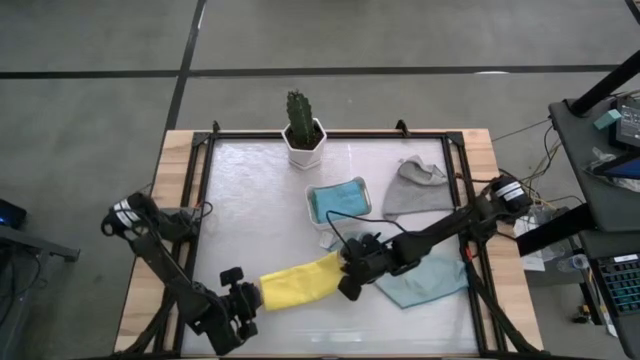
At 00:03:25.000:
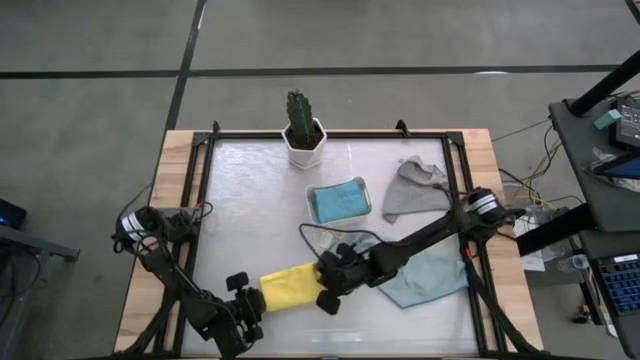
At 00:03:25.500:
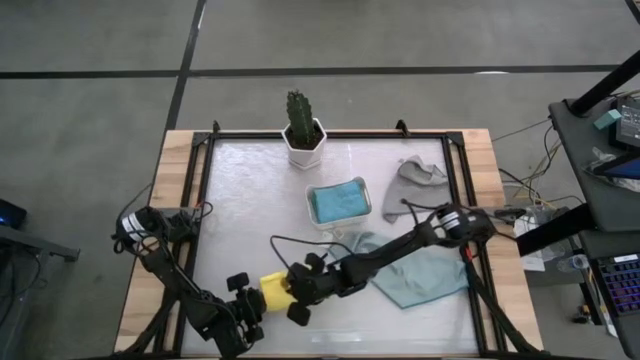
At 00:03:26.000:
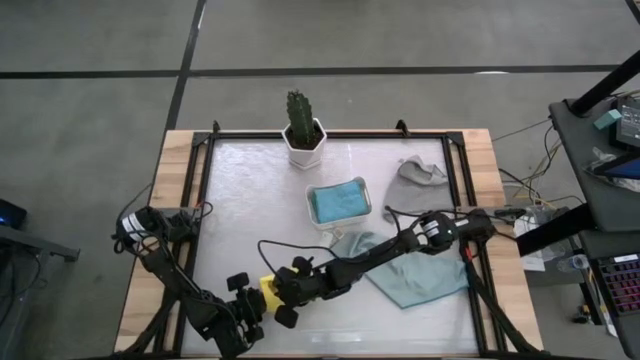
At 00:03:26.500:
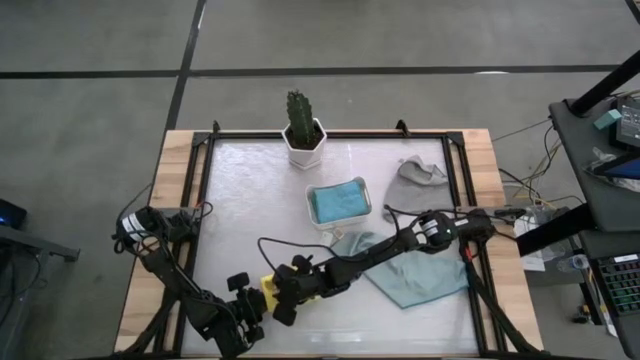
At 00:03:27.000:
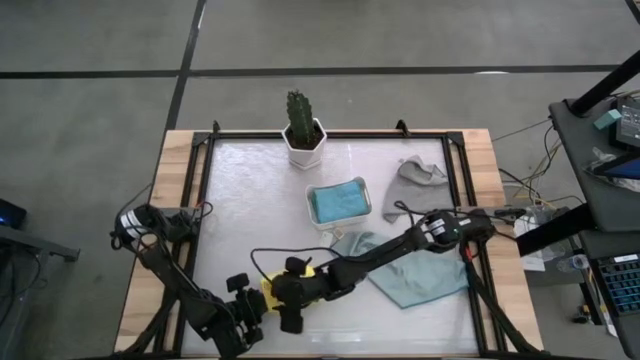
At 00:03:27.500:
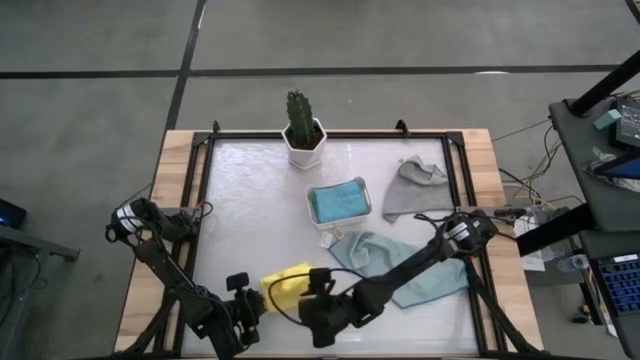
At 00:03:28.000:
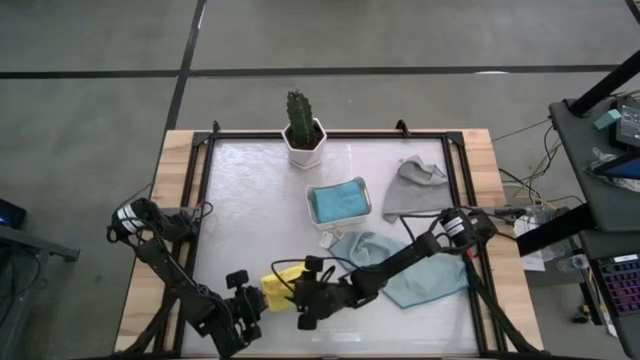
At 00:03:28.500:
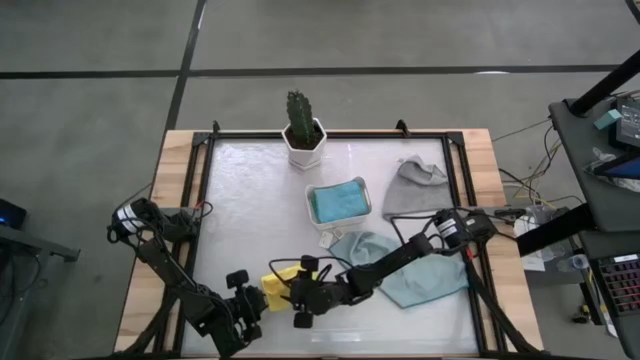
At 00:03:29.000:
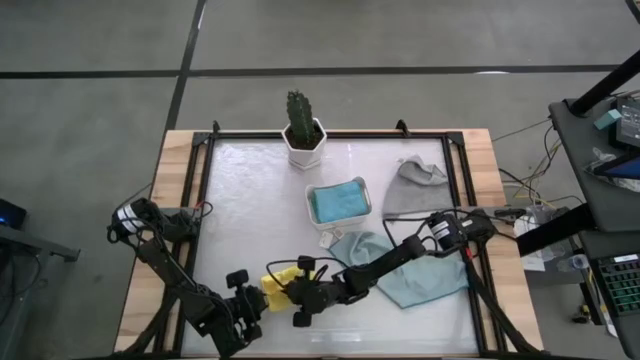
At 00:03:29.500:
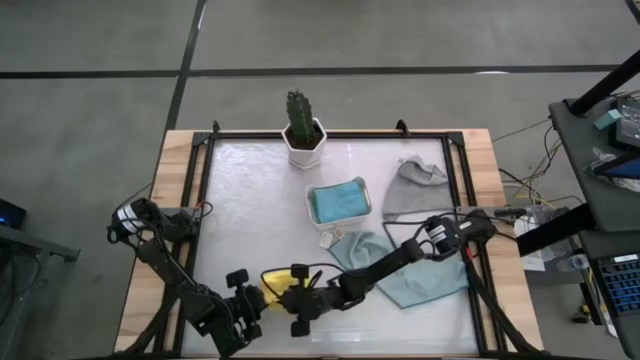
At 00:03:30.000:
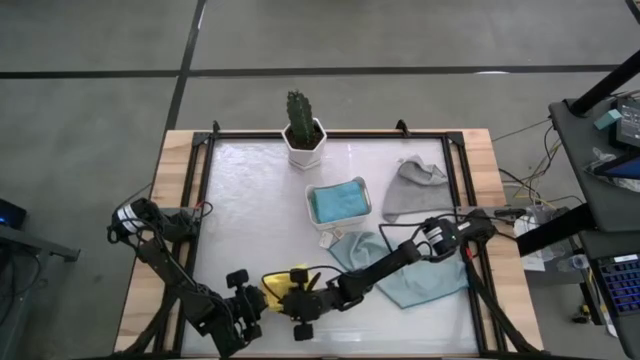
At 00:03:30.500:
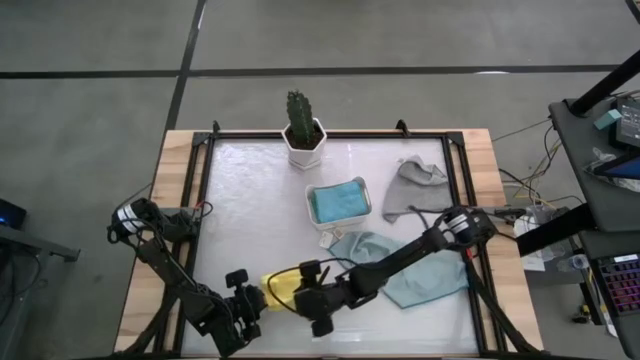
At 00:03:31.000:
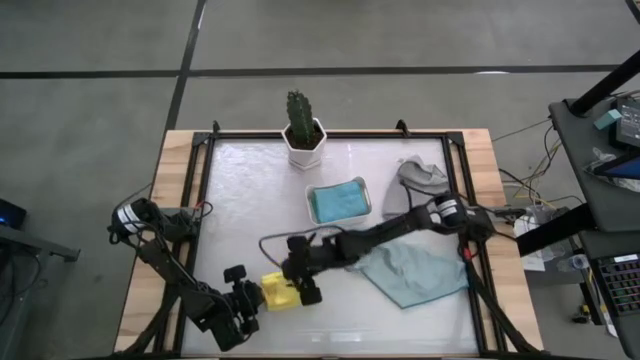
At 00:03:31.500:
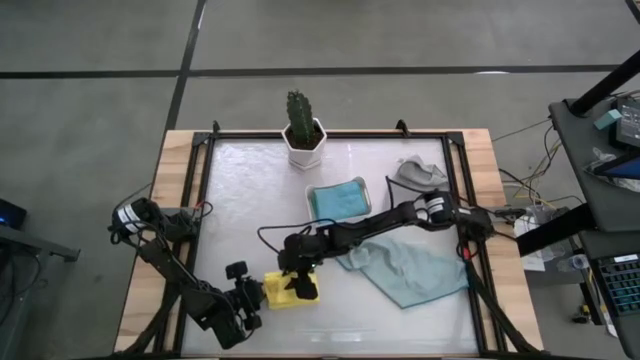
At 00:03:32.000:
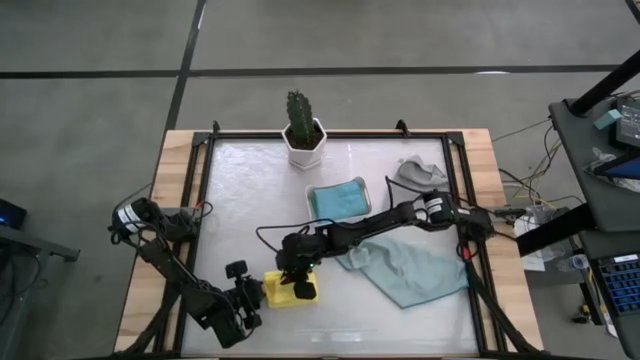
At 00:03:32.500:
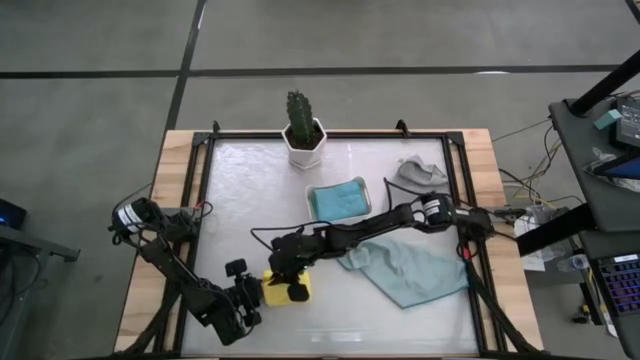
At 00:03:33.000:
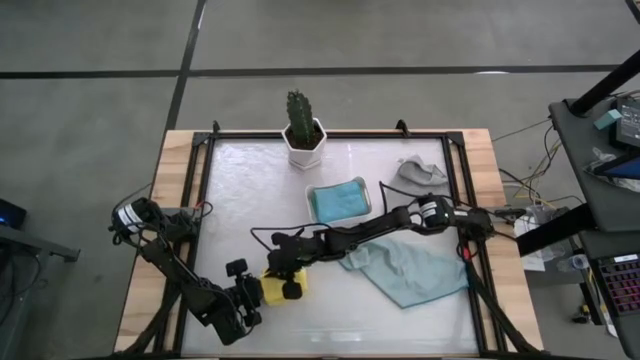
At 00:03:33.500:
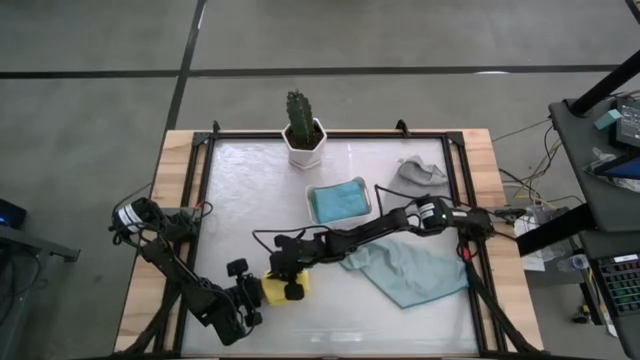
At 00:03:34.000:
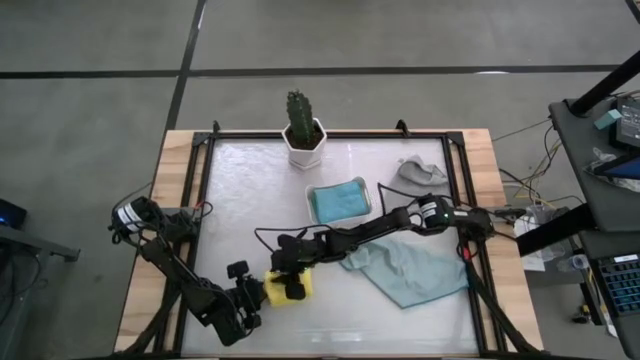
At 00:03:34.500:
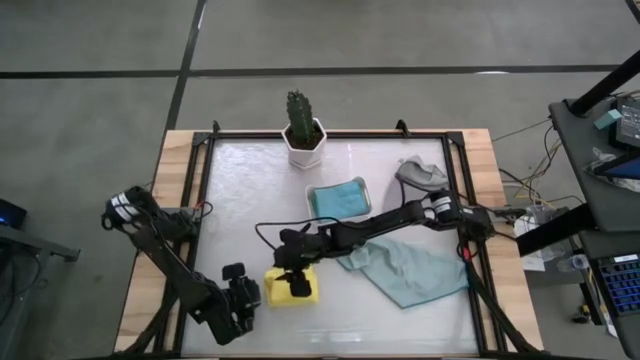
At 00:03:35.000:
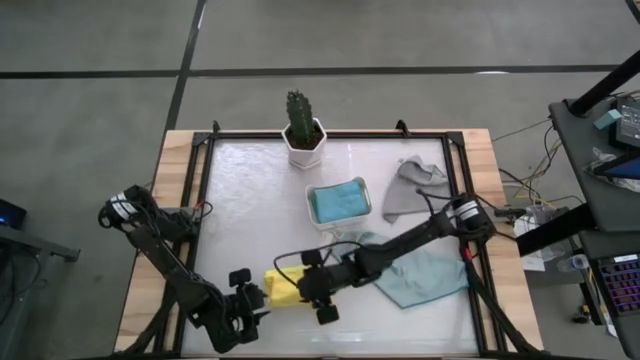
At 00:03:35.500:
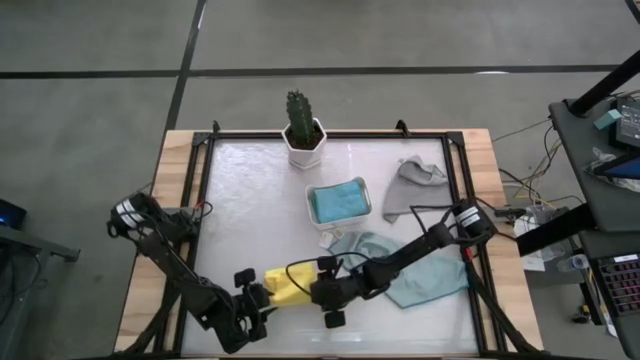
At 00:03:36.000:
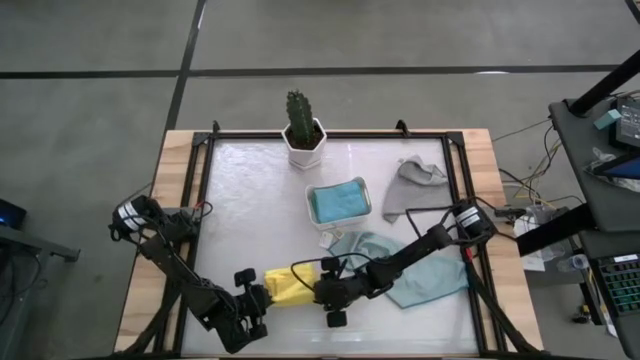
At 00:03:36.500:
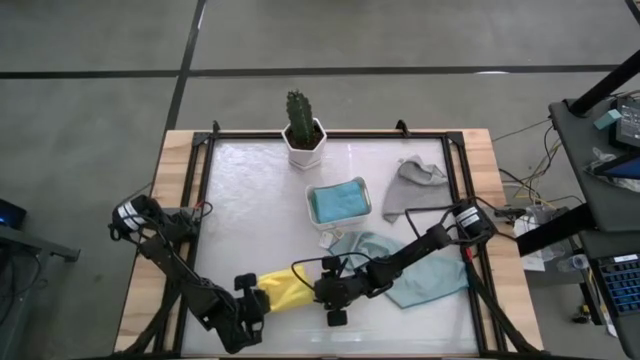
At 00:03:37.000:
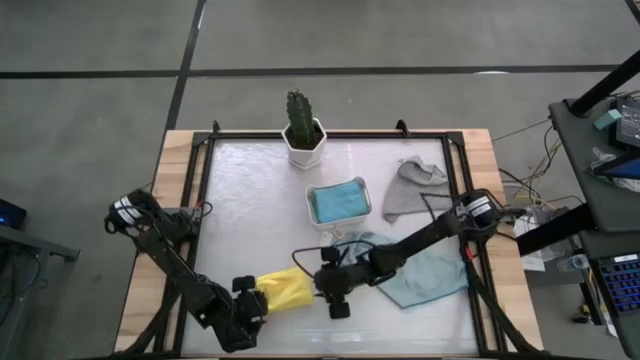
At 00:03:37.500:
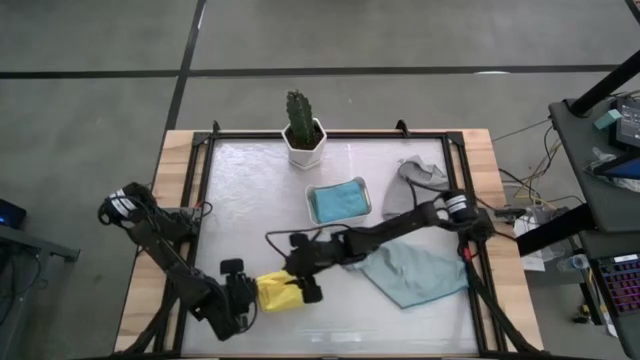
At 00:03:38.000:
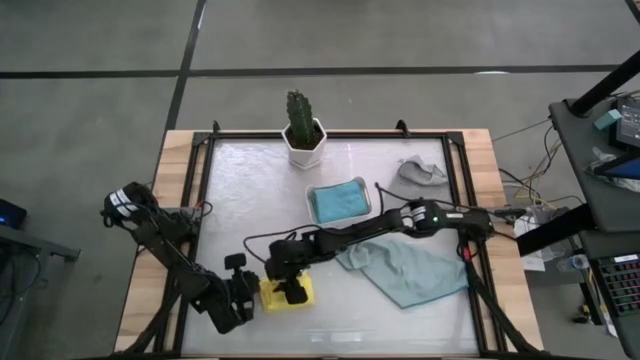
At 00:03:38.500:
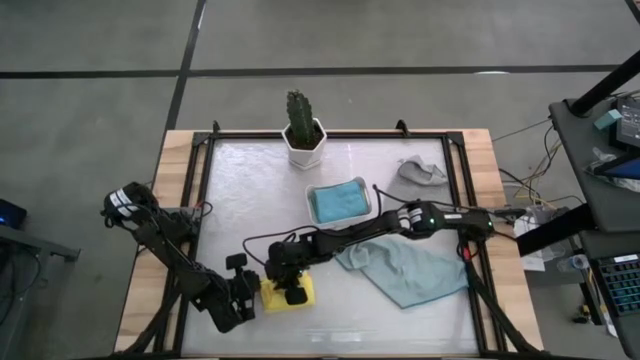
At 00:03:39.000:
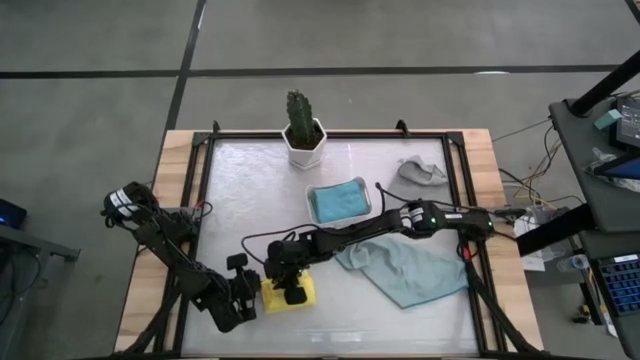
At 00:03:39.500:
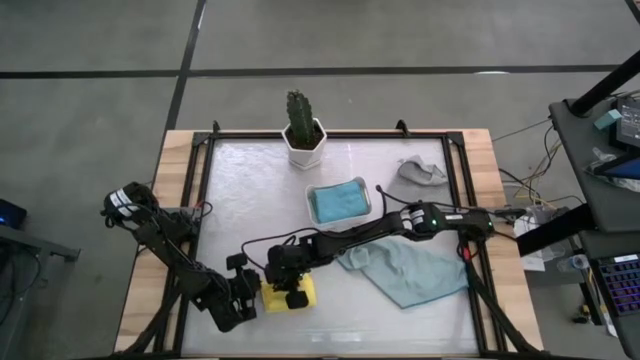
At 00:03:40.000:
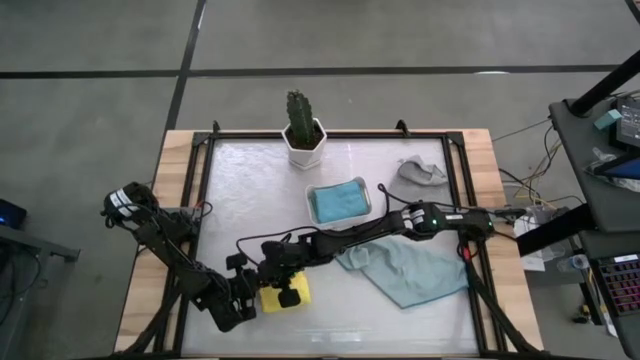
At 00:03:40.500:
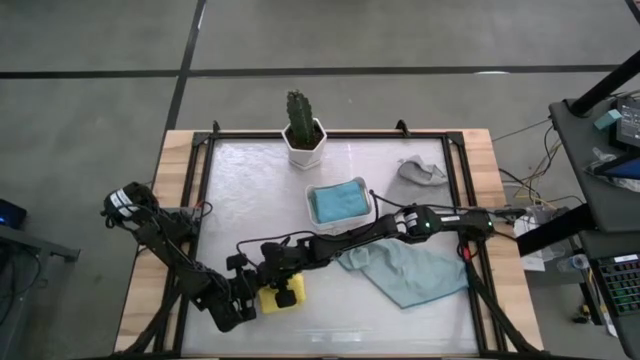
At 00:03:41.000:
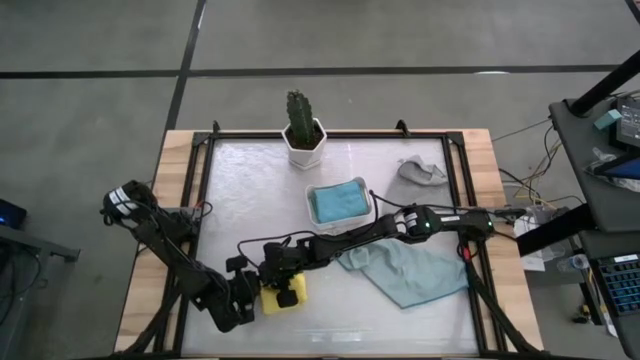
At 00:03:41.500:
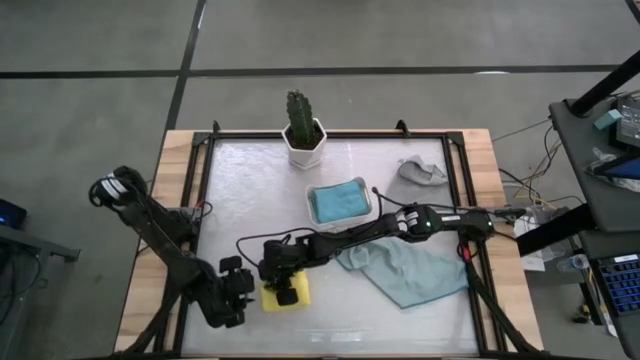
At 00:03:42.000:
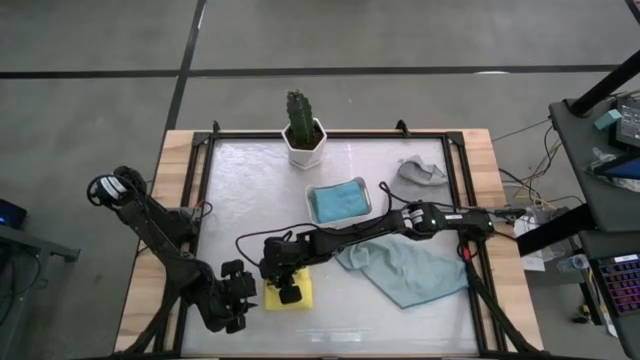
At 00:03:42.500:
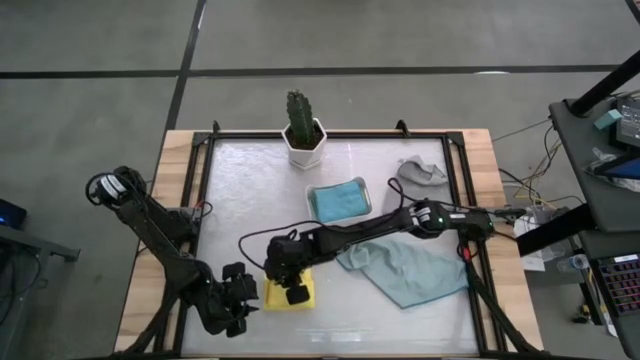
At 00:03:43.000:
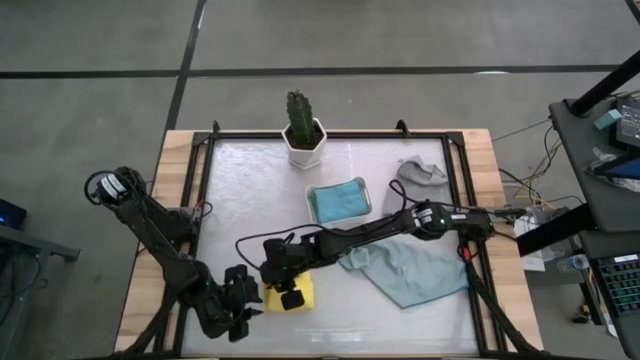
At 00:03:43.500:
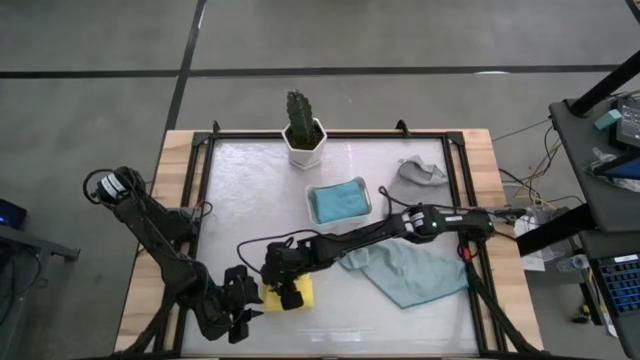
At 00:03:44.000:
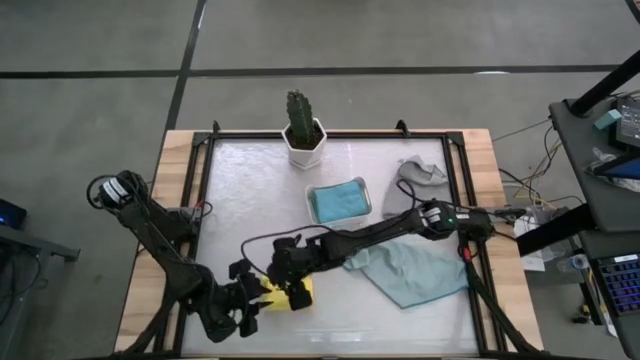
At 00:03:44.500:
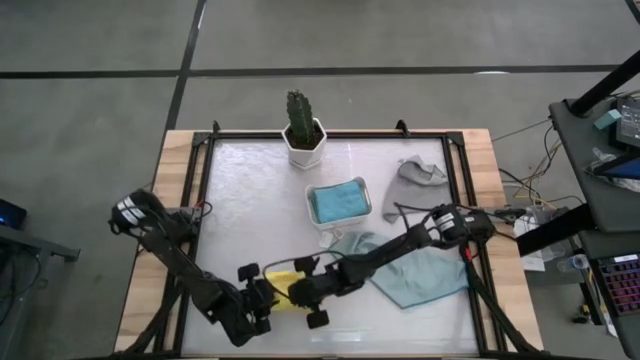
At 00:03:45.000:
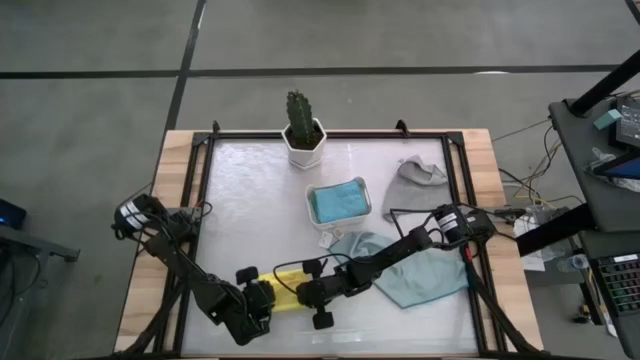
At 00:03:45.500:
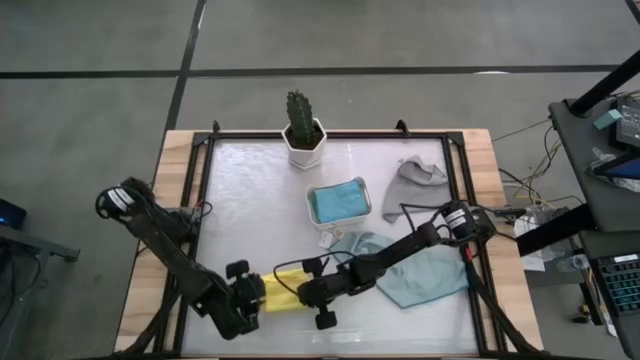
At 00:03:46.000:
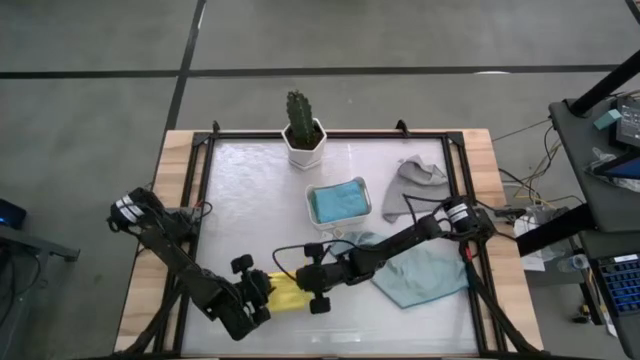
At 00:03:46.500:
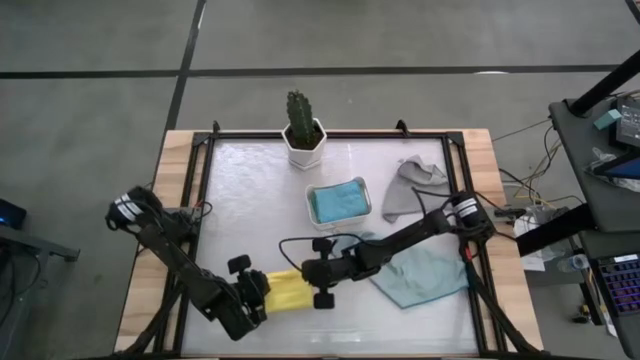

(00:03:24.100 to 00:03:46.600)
Task: Fold microfiber towels
Fold the yellow towel
